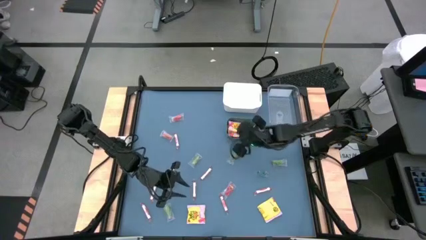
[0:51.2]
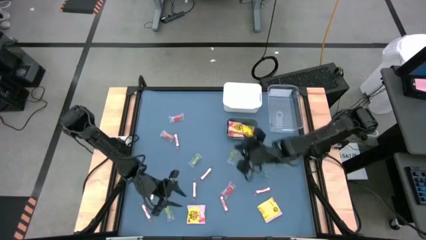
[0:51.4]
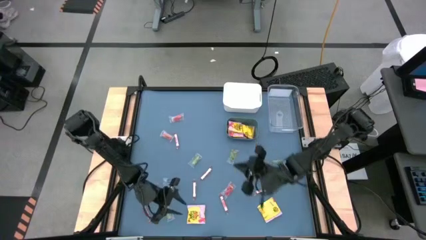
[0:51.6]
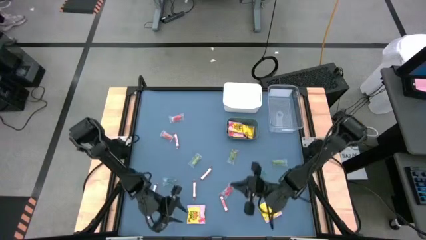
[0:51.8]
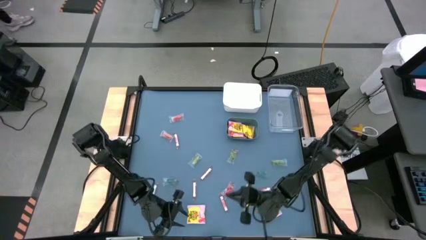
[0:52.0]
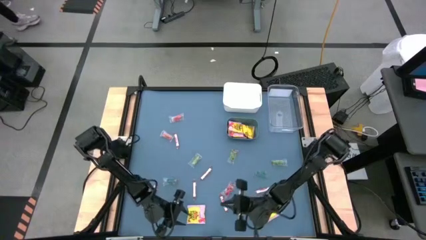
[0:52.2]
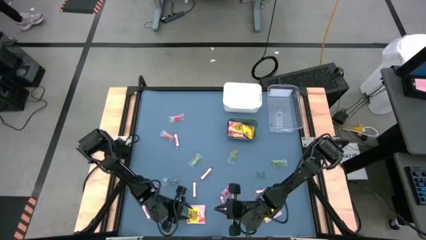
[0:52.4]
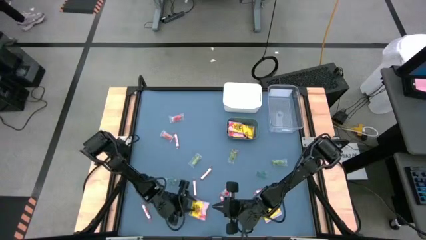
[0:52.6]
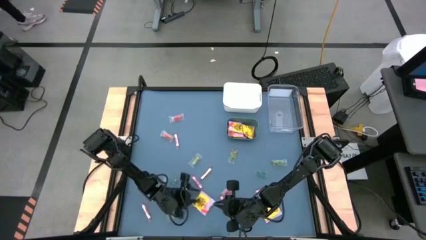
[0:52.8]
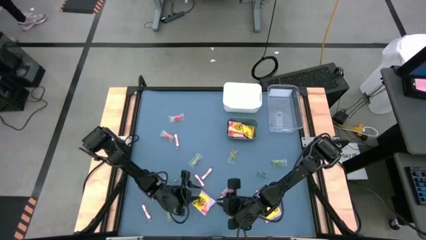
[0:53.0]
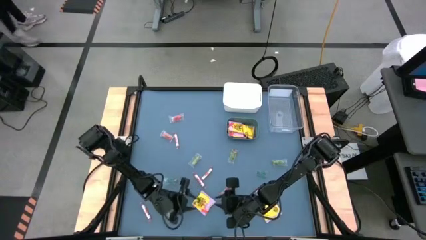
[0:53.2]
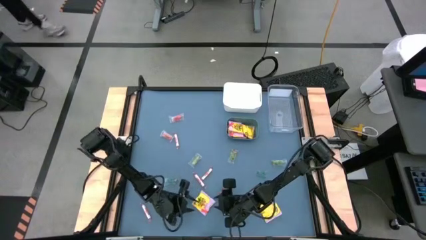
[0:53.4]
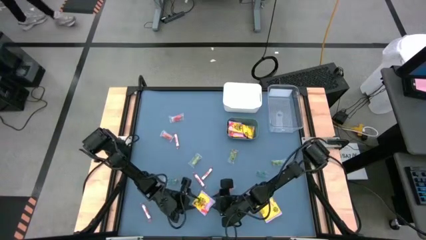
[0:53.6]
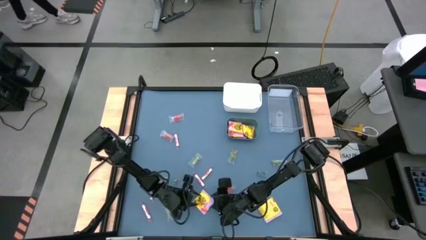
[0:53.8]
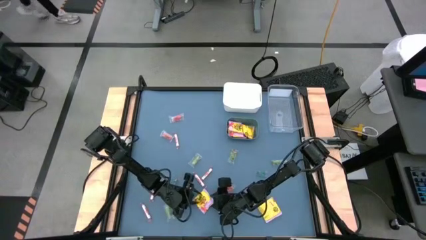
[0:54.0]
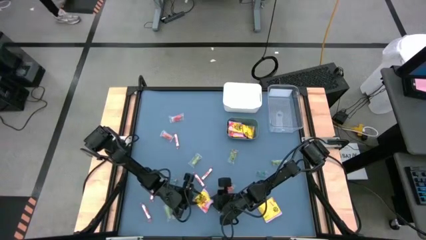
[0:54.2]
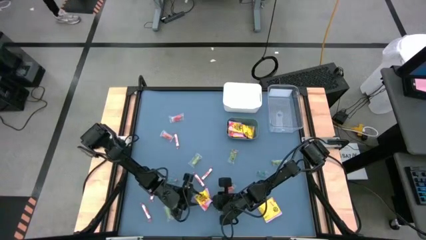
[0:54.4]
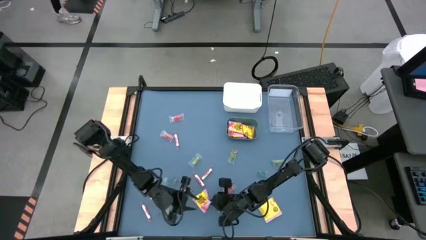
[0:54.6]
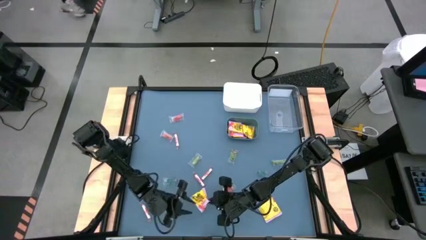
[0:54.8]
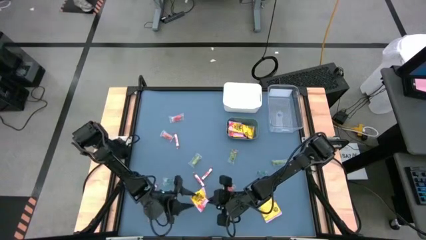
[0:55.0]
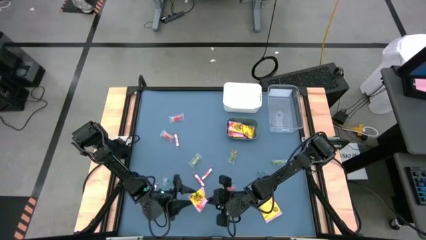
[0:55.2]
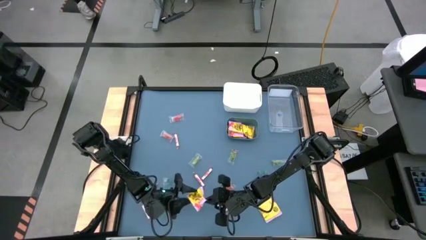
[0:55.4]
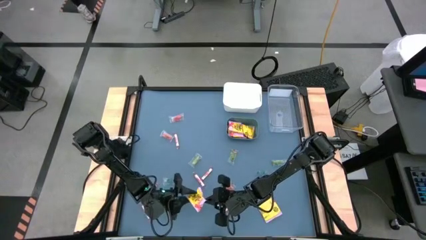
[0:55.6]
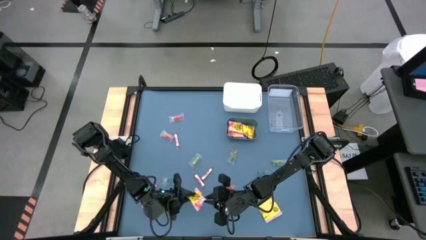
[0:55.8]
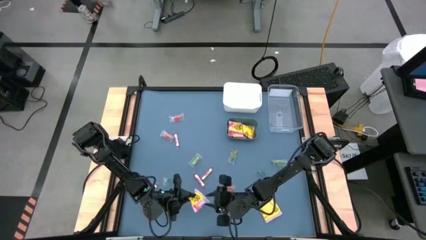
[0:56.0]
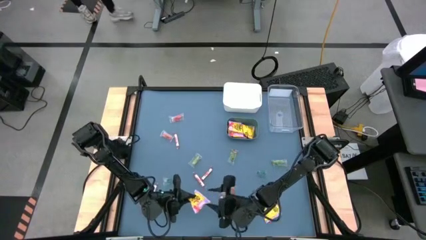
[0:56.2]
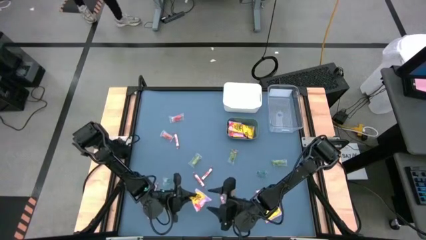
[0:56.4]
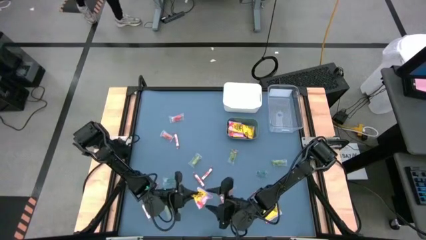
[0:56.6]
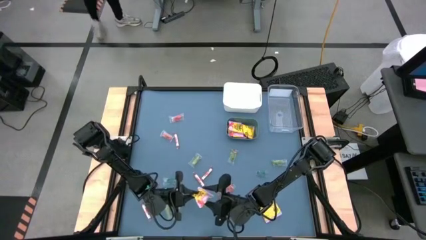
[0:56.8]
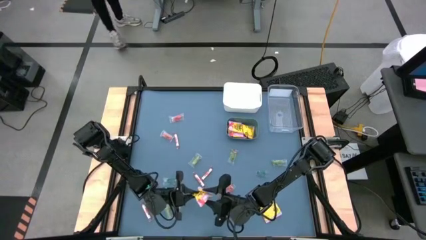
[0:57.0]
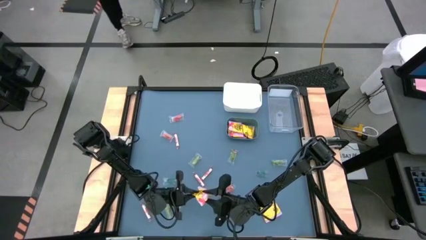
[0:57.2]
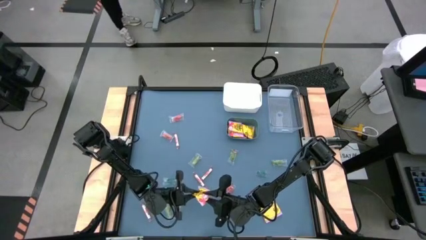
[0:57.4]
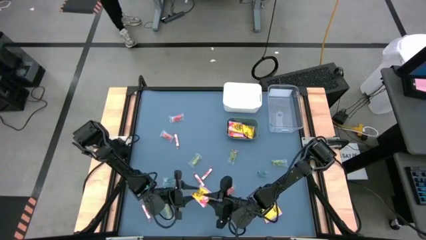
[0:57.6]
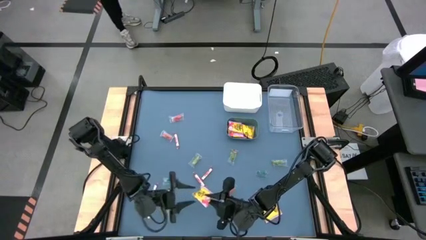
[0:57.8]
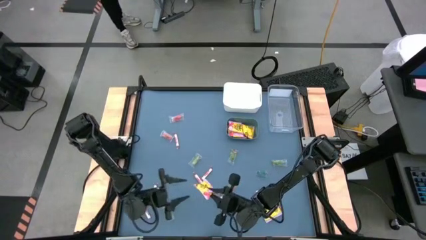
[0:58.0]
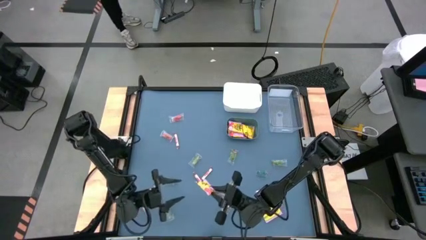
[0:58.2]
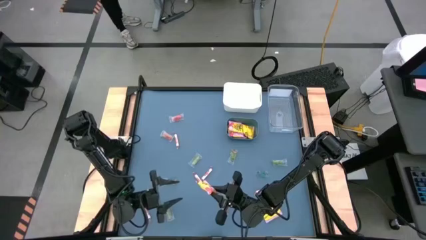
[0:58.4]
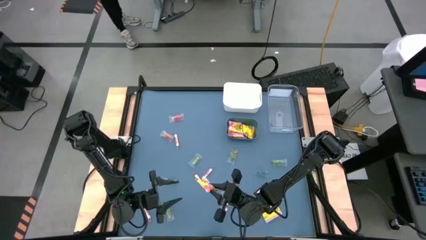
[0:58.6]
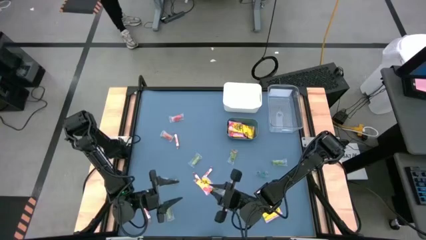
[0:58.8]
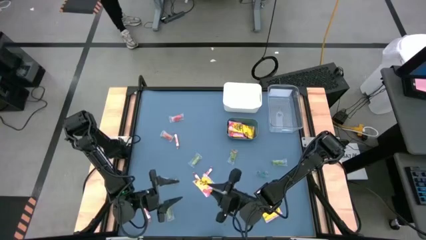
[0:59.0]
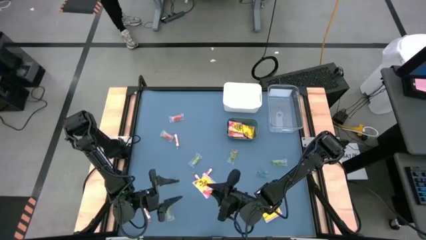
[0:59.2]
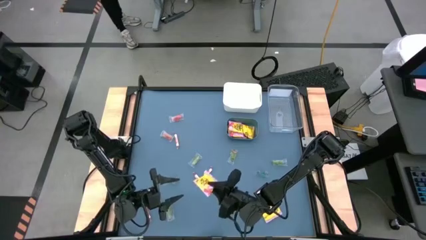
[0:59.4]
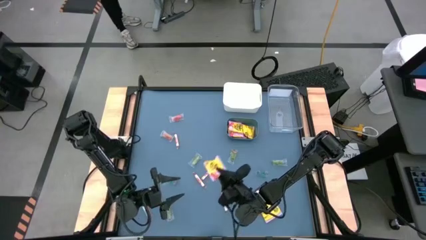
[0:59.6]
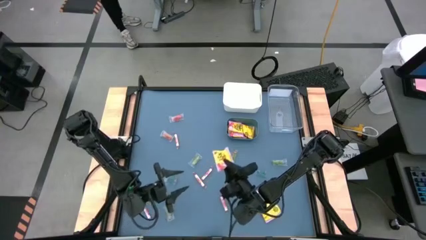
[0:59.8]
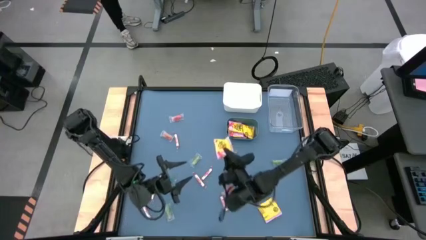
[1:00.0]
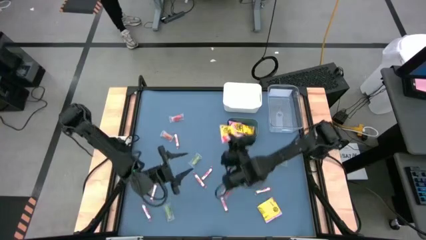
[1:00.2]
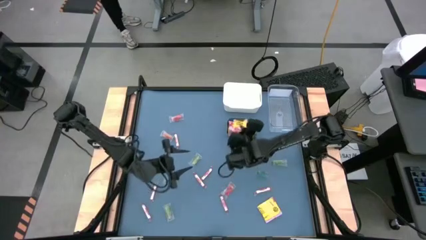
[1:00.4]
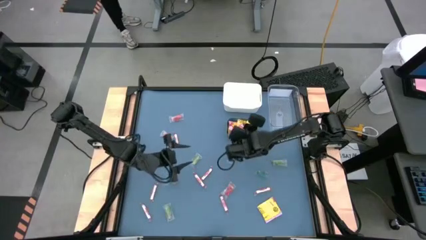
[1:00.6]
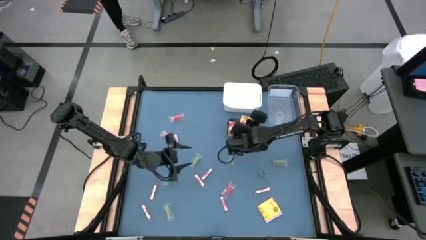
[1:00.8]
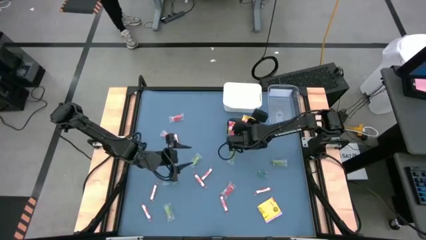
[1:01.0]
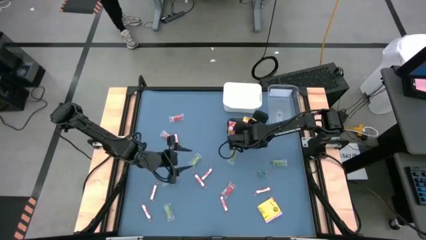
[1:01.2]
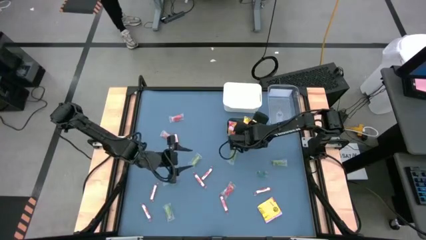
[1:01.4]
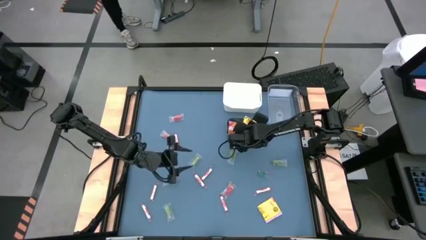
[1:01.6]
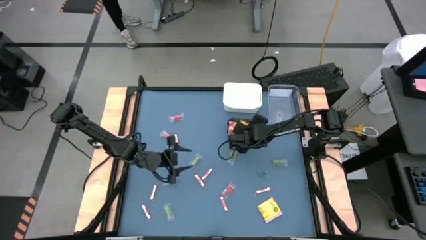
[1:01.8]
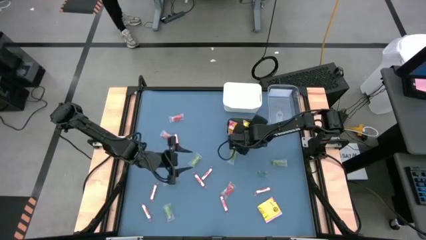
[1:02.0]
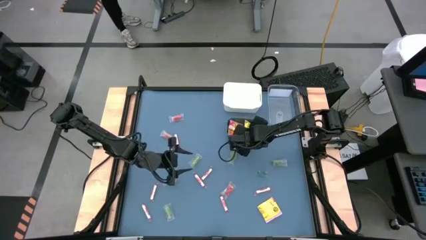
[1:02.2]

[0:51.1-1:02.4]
Task: Sort candy
Put the left yellow candy into the green bin

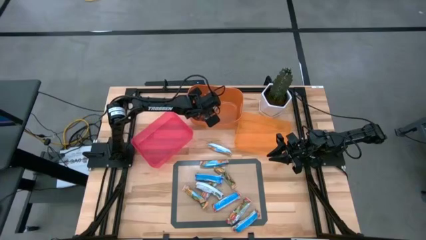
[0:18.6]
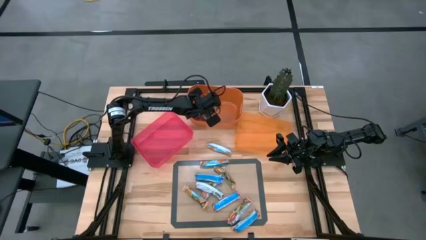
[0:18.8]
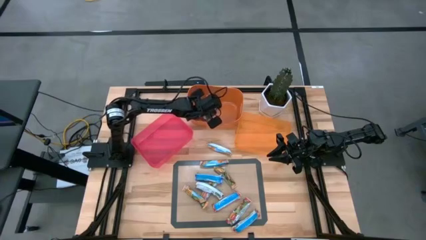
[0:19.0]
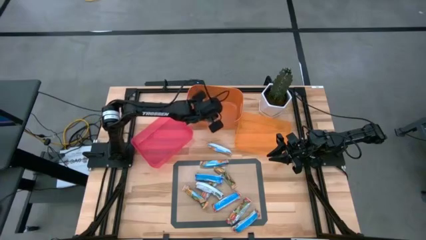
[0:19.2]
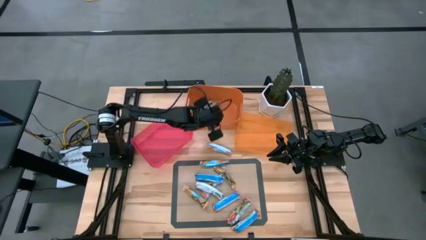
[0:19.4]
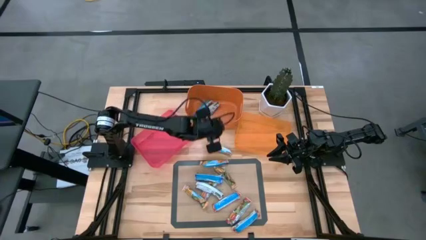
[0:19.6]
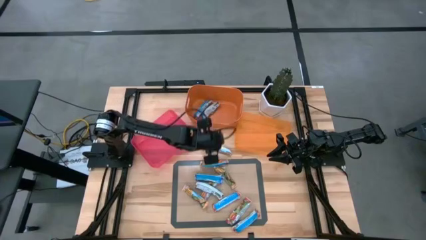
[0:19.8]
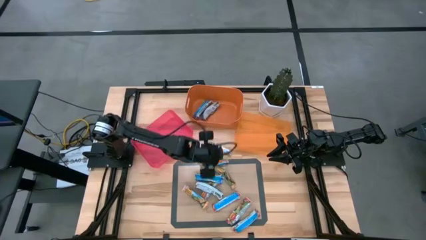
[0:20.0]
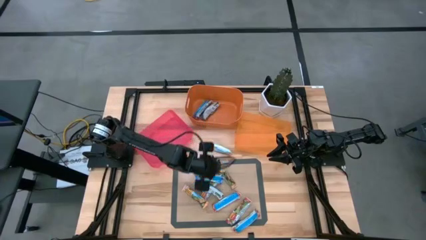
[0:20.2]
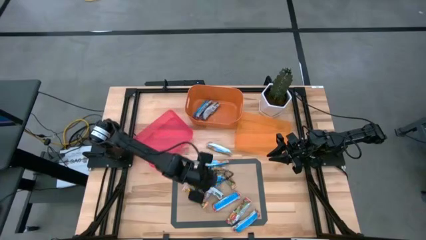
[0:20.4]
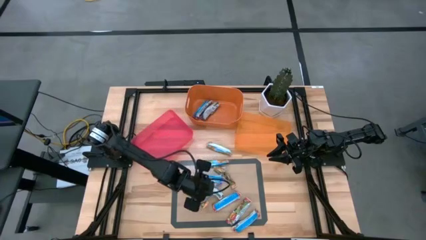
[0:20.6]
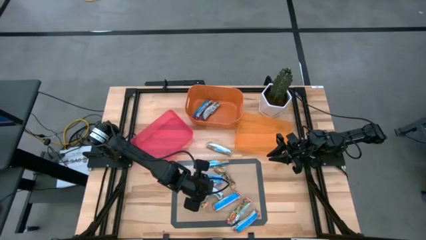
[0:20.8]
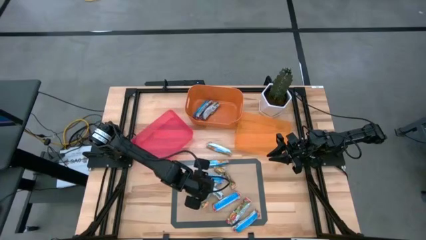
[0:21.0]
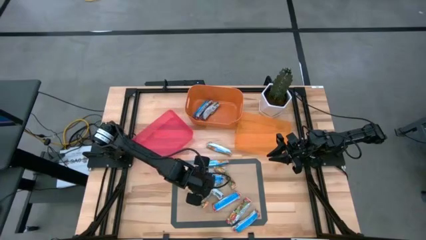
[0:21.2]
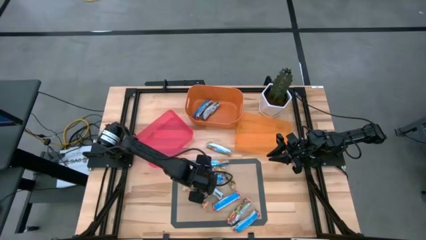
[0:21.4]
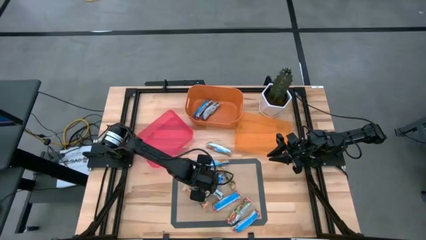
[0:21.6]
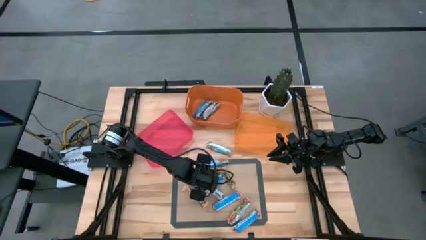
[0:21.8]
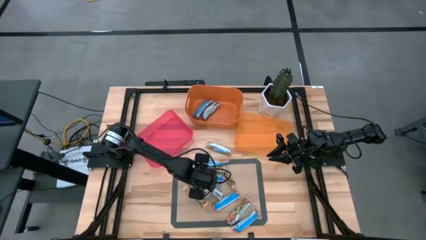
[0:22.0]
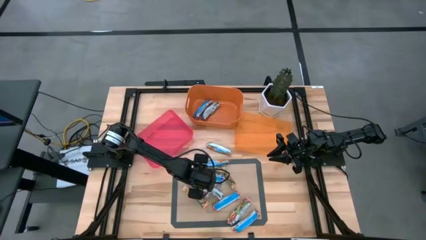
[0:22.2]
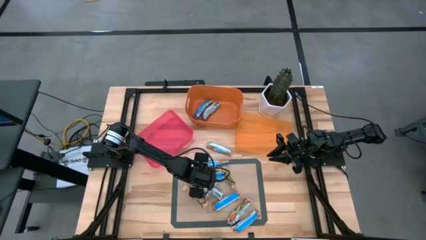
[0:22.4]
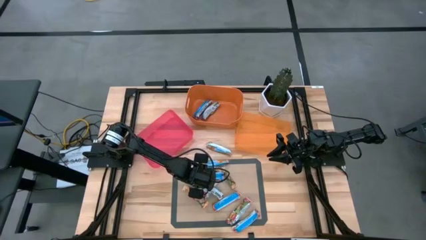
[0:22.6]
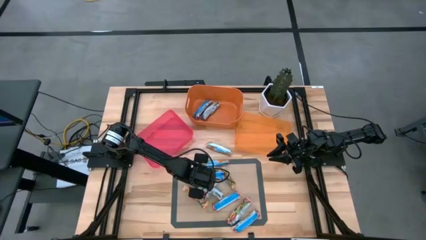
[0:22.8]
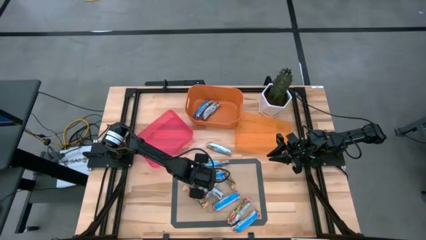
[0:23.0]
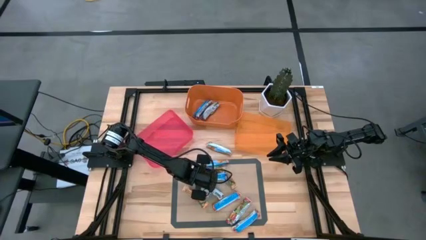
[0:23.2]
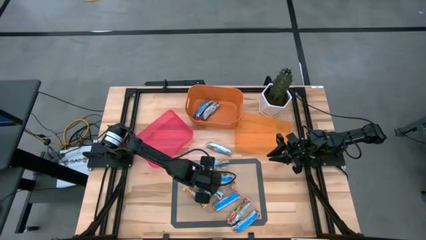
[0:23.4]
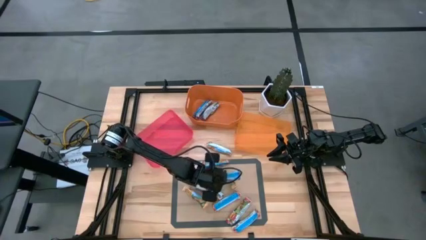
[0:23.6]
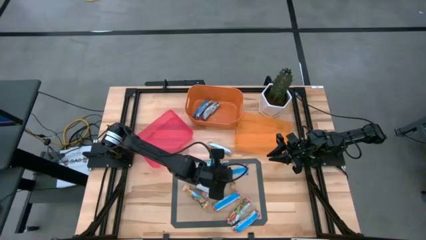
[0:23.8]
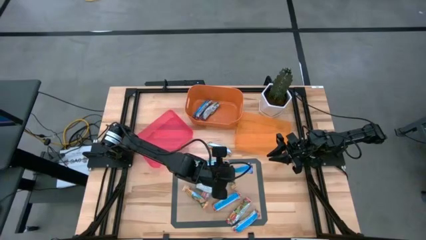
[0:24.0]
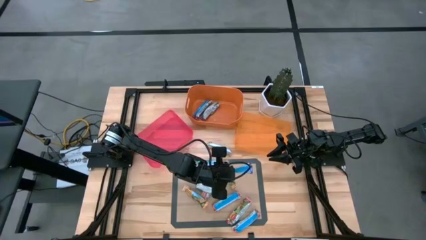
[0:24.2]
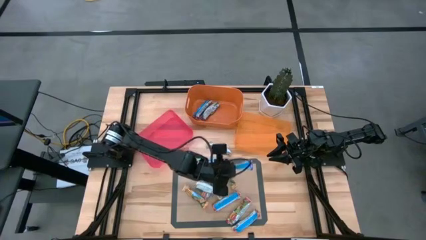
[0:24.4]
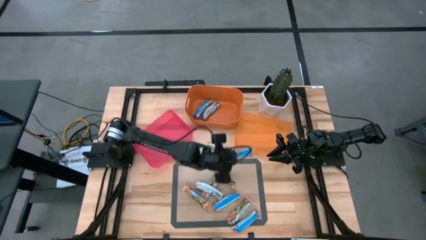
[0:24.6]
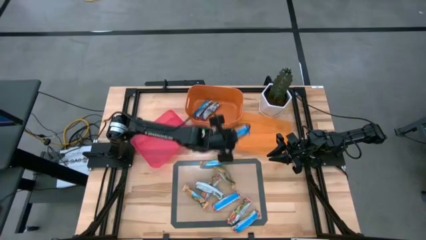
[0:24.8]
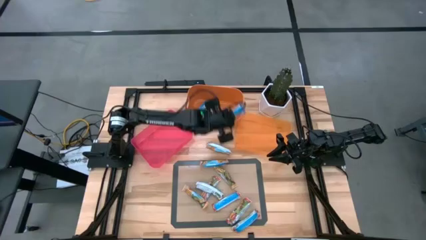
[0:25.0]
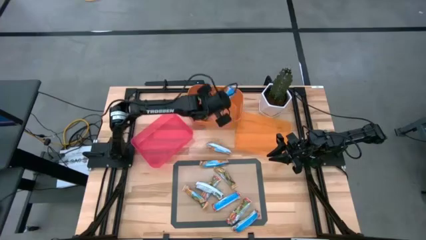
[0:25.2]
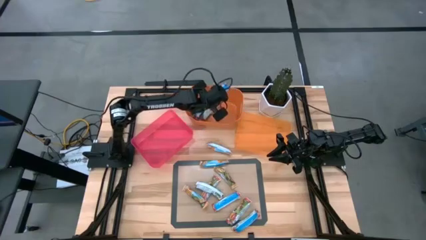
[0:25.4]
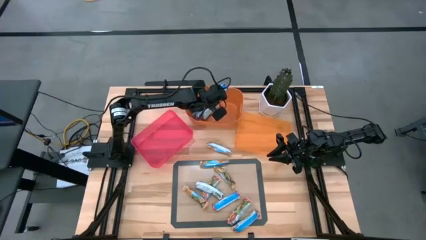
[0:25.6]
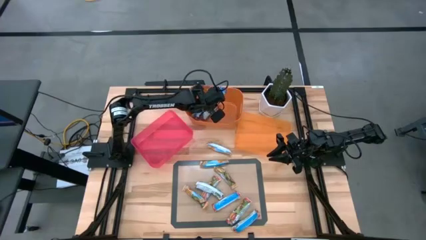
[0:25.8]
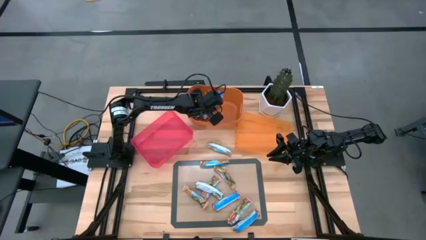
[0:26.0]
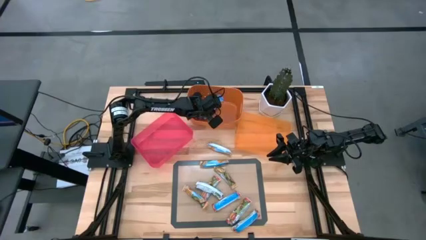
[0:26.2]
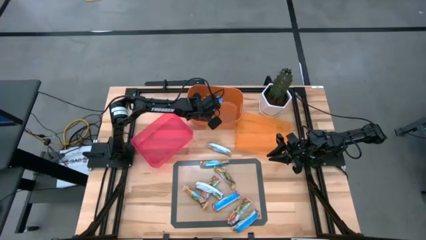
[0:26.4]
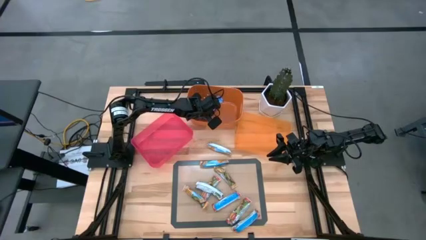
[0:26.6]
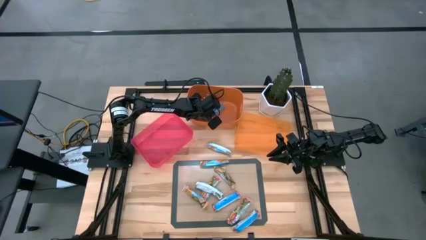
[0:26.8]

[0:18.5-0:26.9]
Task: Pick and place Granola Bars by type
Put the blue granola bar into the orange bin
